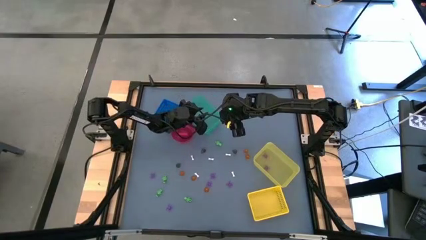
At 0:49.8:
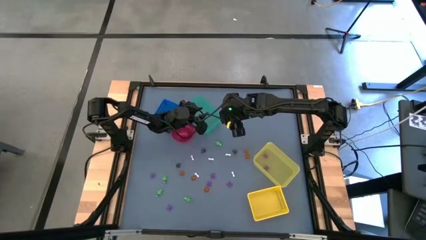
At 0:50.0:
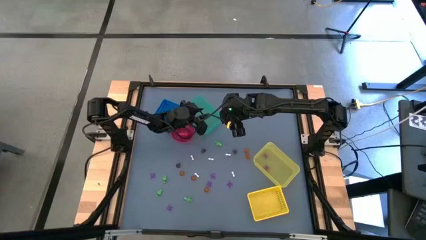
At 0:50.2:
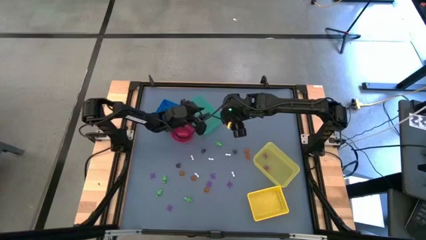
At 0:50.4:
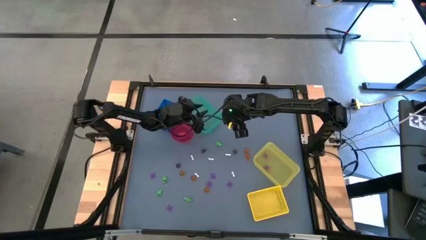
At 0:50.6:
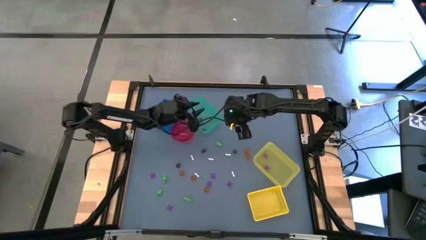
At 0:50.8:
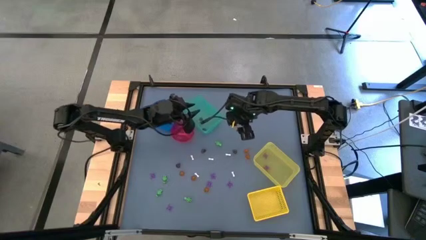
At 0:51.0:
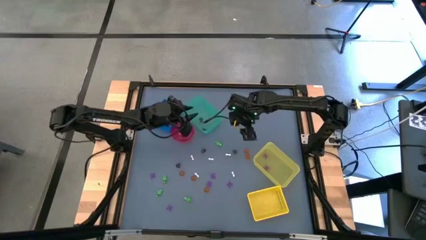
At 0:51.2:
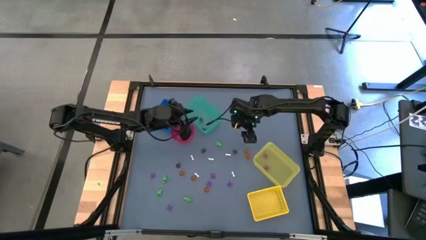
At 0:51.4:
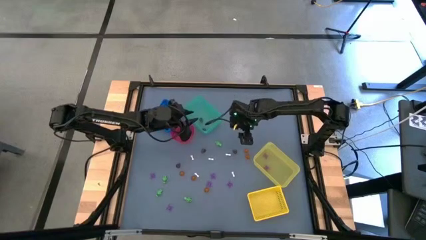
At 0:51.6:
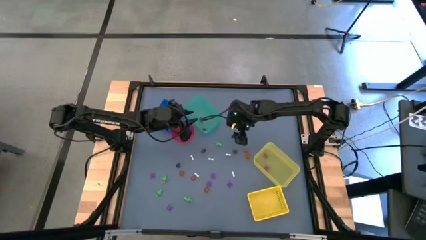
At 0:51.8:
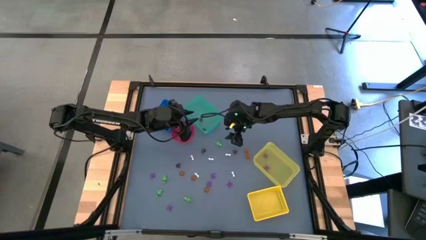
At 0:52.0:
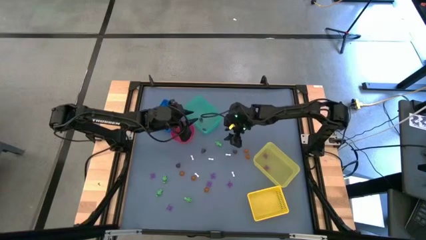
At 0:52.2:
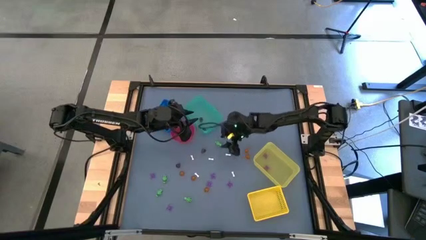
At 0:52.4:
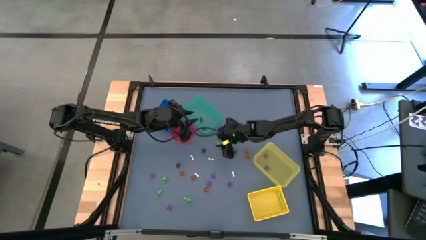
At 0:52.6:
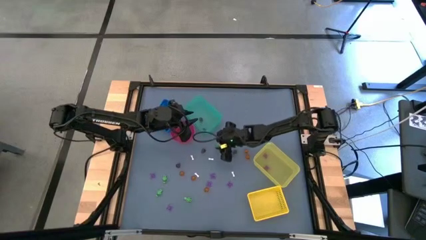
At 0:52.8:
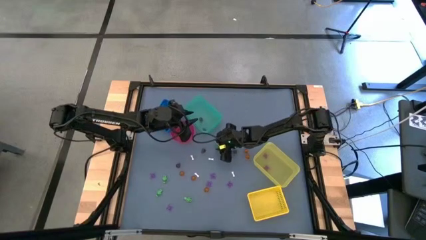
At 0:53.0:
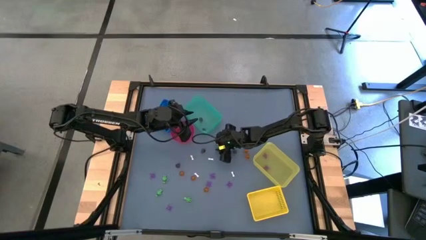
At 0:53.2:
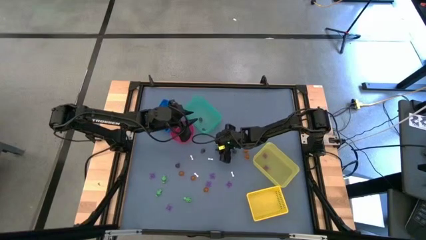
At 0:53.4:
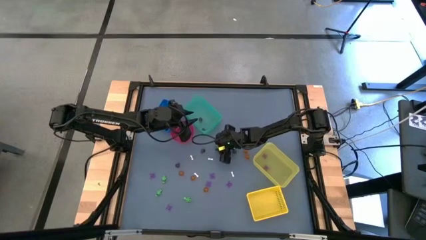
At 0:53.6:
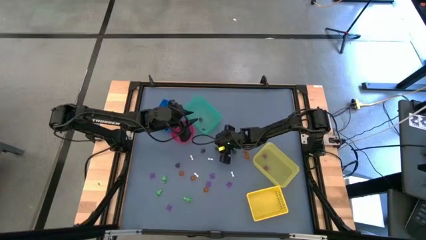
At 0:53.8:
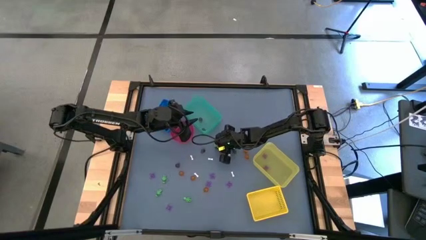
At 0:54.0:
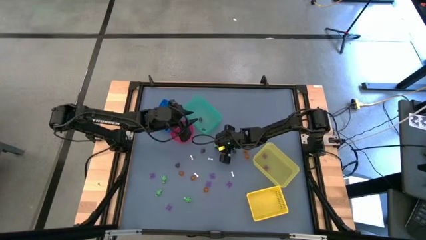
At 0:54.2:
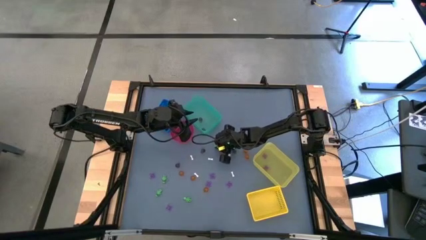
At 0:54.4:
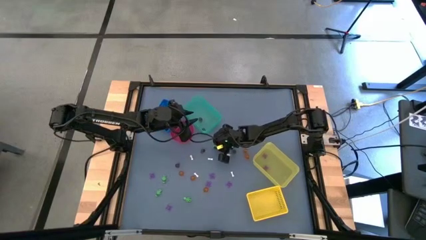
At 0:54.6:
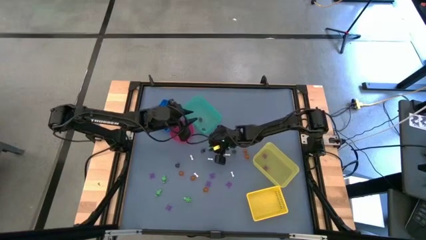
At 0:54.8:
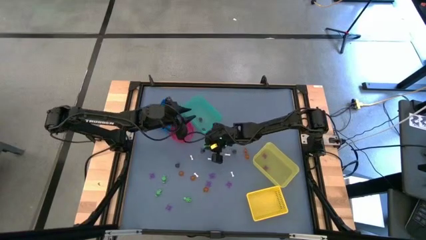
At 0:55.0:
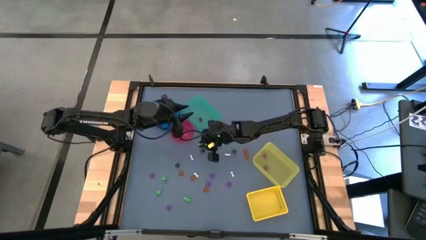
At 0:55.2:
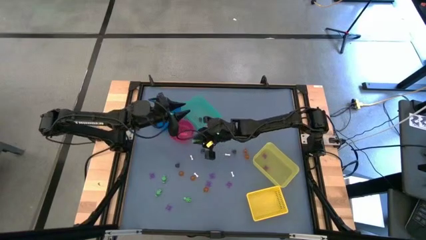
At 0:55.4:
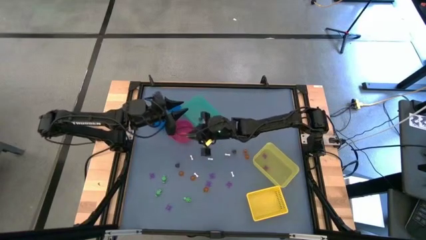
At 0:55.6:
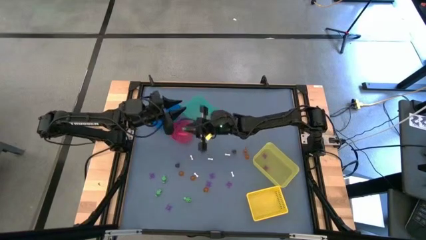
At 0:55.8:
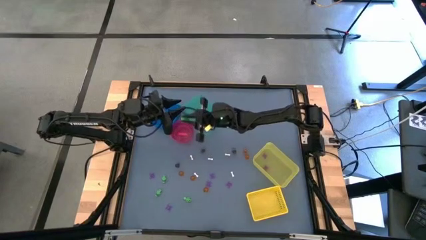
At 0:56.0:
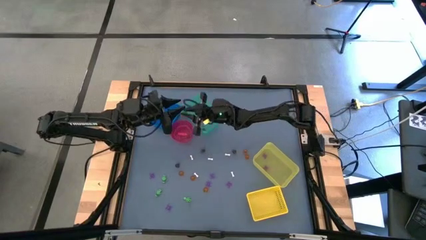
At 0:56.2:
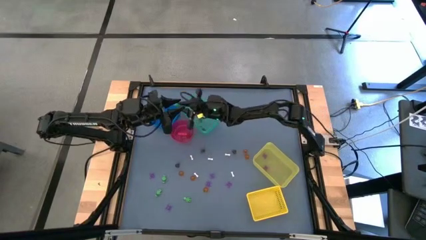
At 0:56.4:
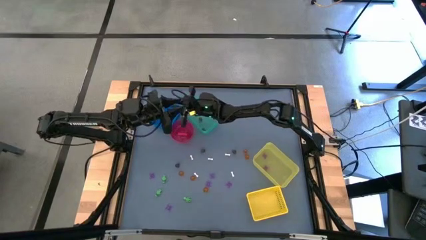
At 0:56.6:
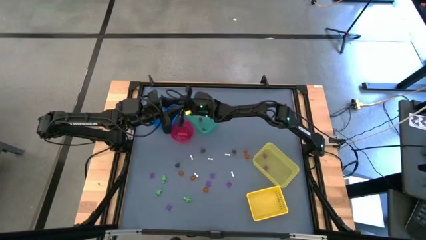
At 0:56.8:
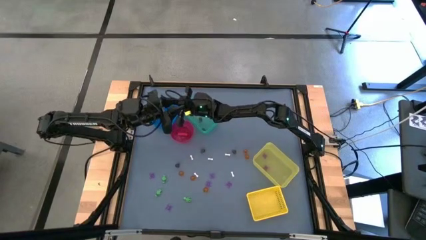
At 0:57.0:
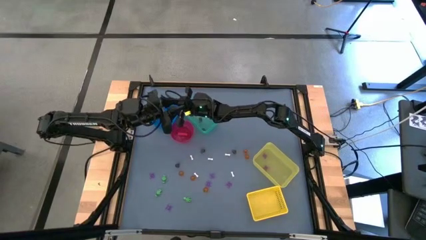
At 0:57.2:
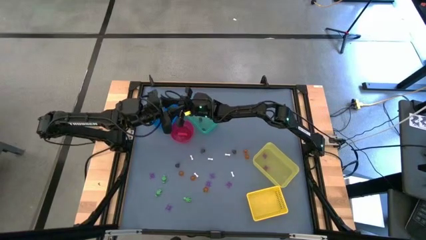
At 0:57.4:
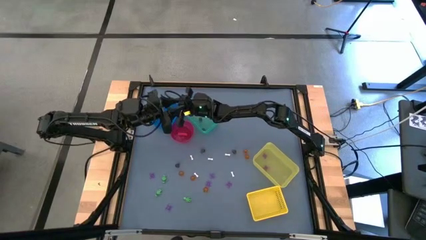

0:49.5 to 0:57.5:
Task: Sort Halloween decoration
Put the green skeleton toy into the blue bin

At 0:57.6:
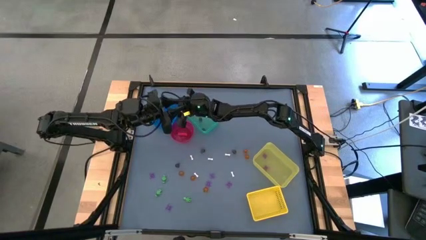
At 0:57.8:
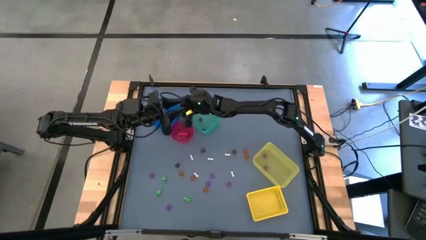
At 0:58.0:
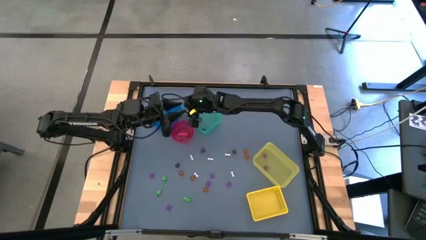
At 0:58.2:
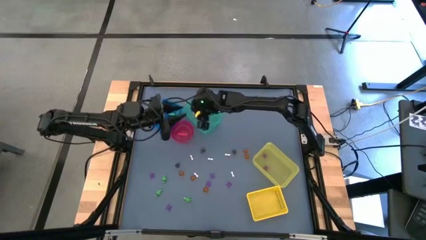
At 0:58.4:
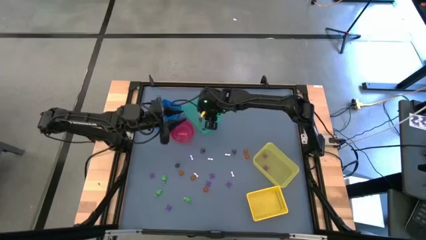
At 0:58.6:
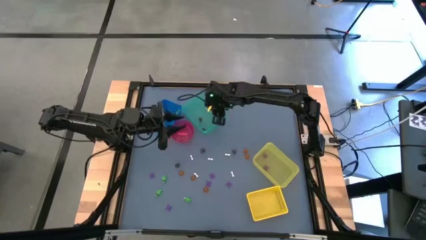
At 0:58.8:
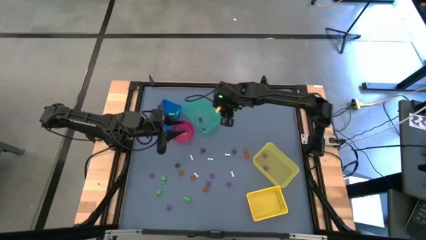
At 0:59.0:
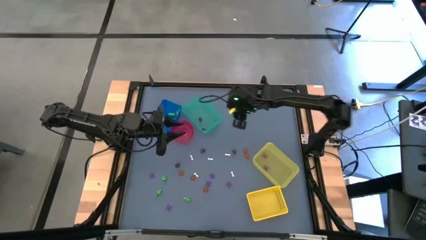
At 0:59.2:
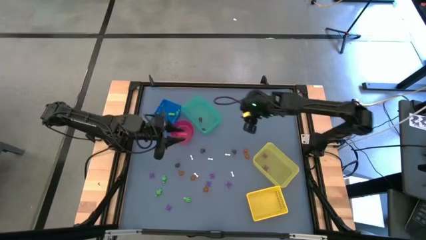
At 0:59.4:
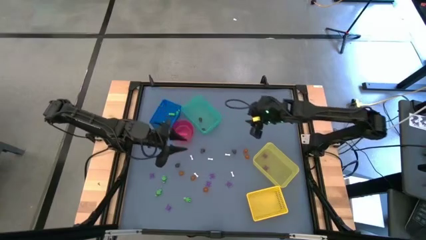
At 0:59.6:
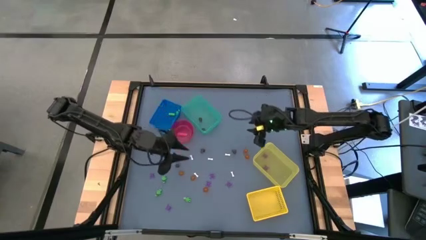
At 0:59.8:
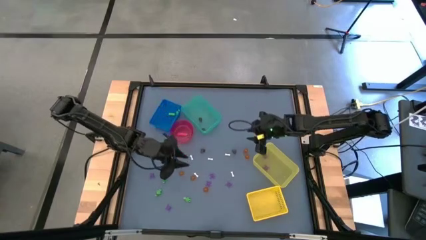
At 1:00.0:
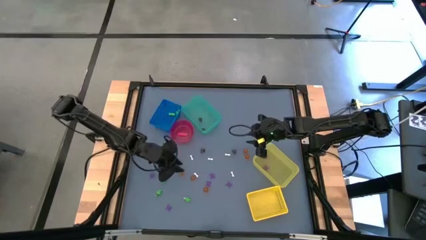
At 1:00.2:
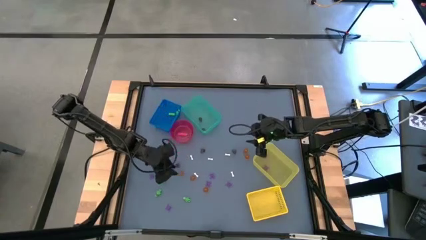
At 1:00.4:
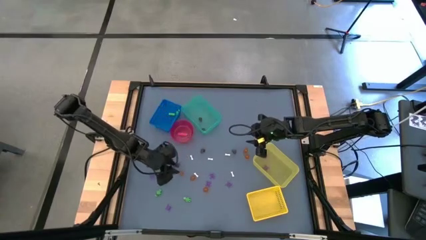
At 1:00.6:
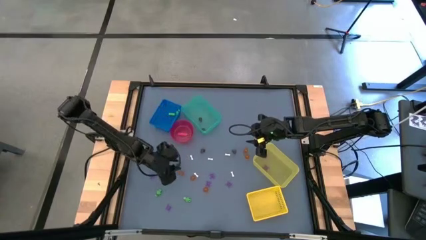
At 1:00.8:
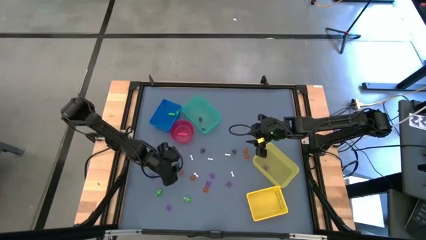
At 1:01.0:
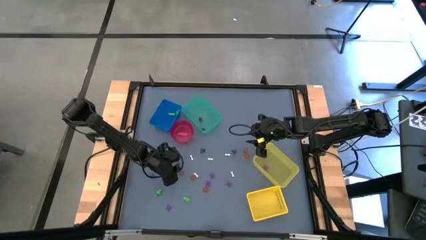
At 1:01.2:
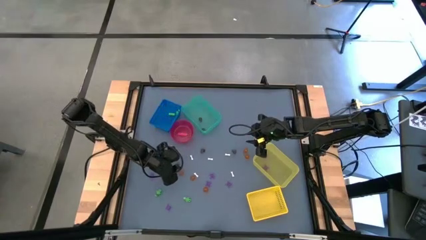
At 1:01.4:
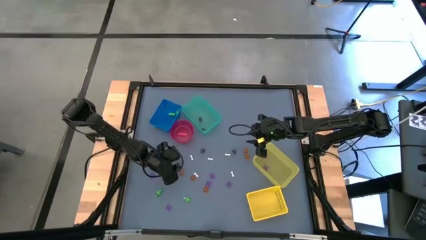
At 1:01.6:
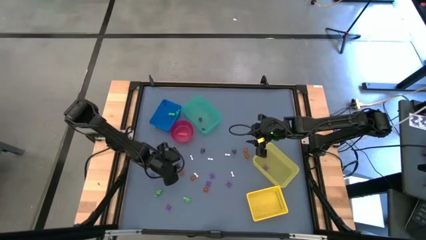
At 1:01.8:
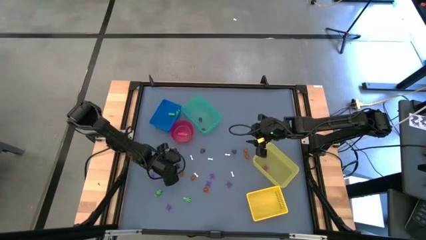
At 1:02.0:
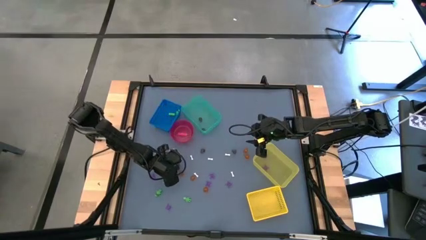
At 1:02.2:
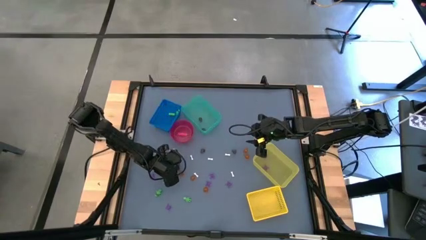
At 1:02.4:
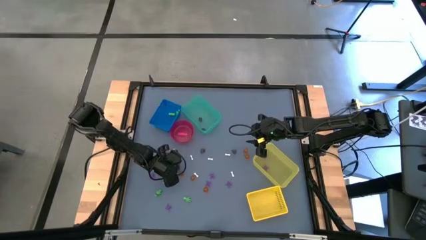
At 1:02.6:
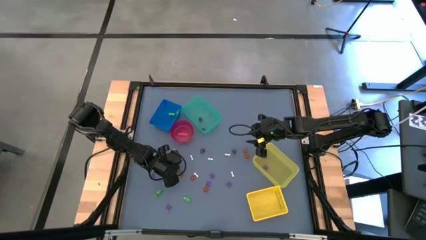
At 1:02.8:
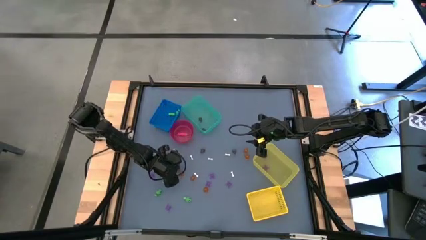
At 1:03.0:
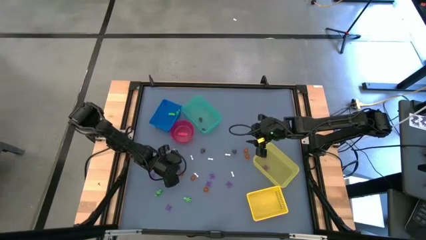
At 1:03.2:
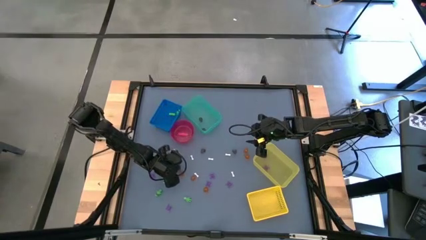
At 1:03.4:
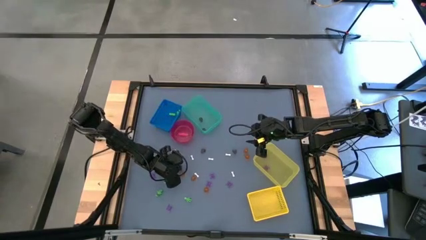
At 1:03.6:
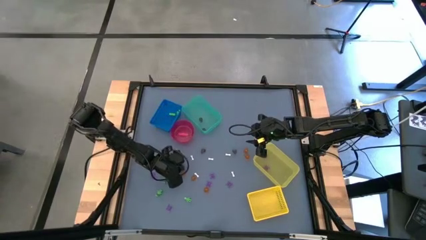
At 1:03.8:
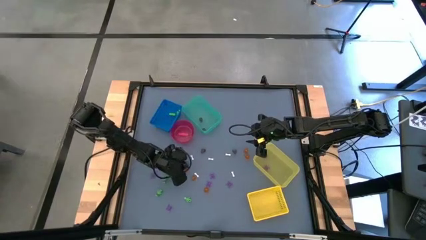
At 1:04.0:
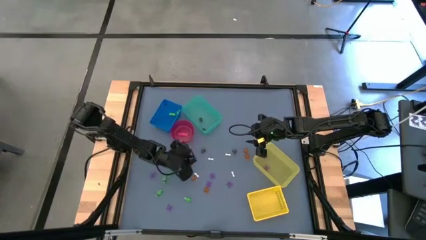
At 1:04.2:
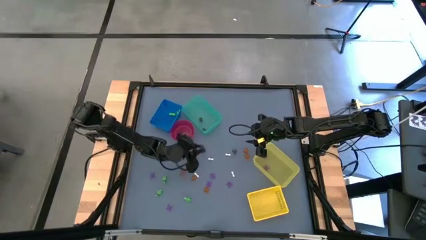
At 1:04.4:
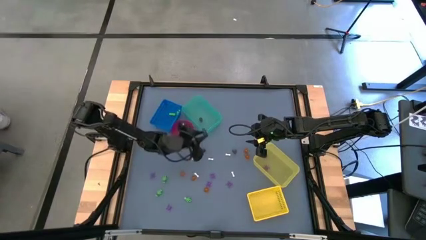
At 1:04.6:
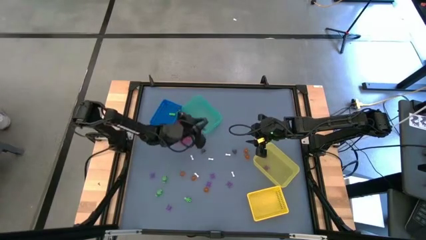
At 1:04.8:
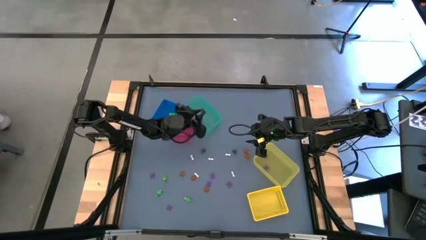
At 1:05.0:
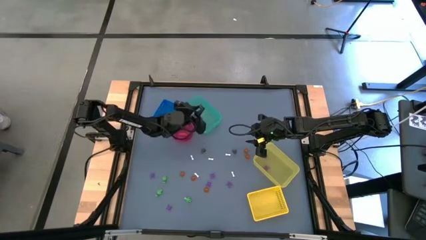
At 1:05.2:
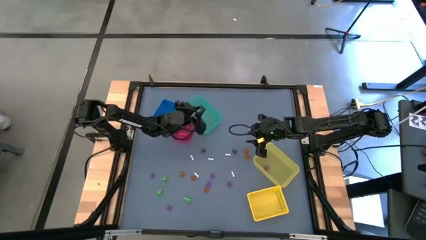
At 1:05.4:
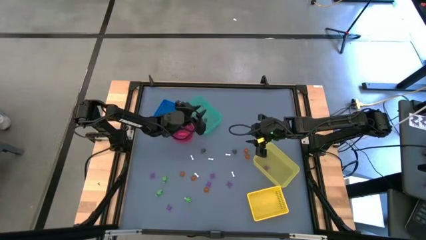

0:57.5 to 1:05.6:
Put the black skull toy into the green bin
